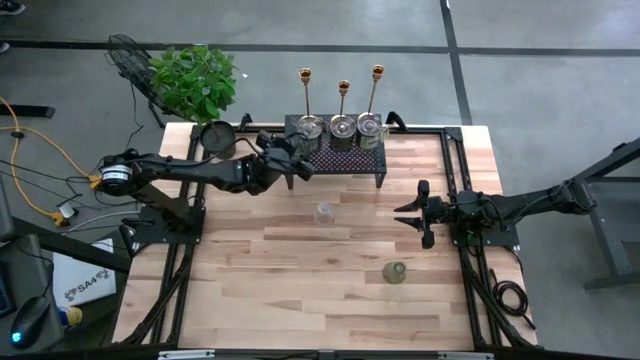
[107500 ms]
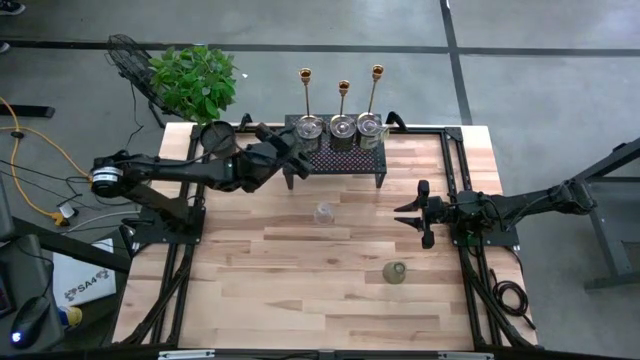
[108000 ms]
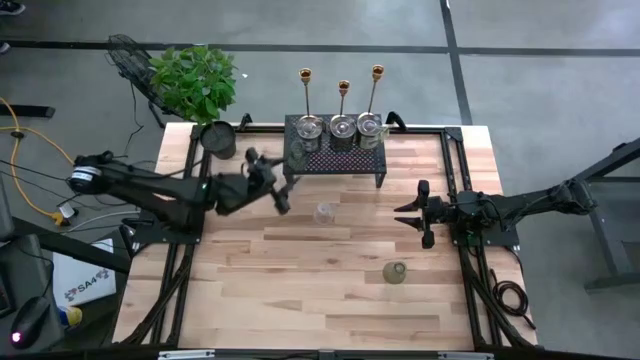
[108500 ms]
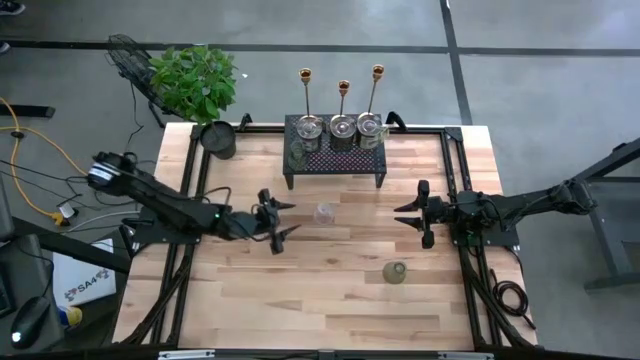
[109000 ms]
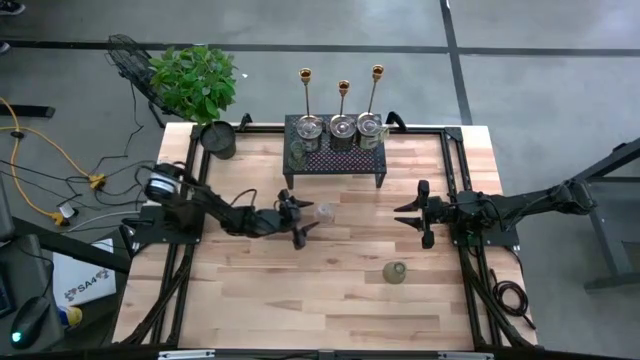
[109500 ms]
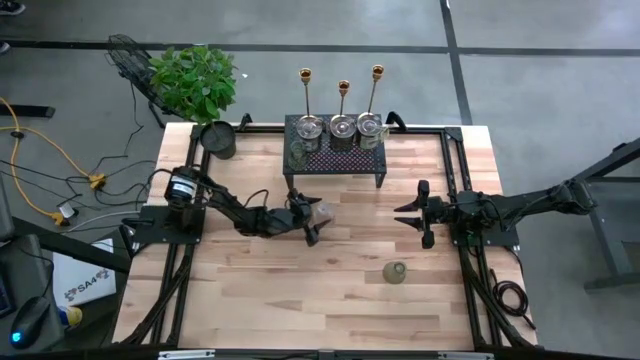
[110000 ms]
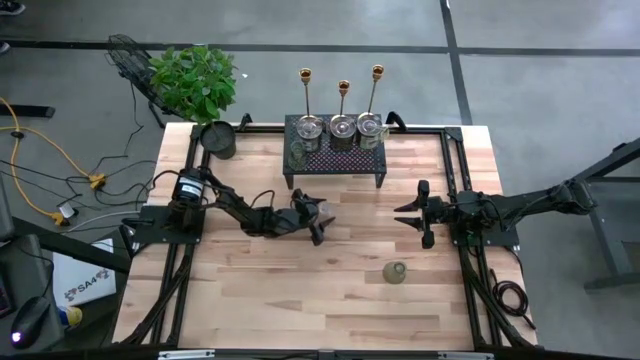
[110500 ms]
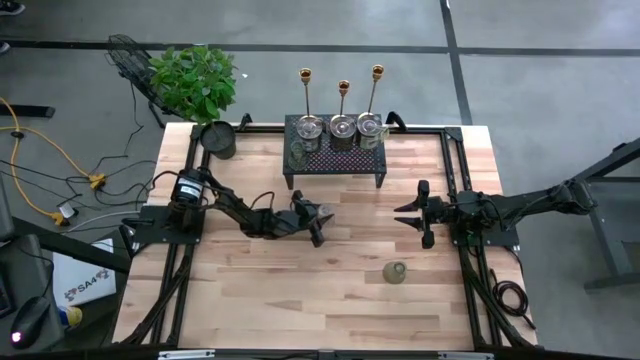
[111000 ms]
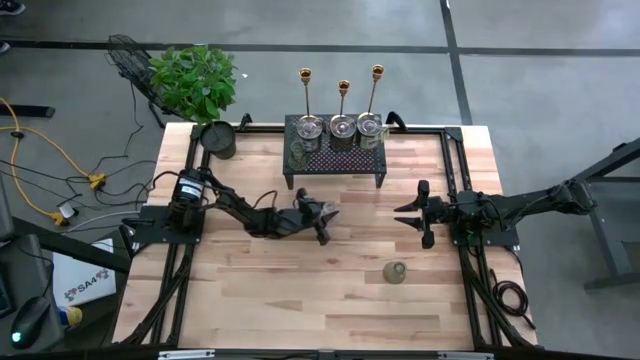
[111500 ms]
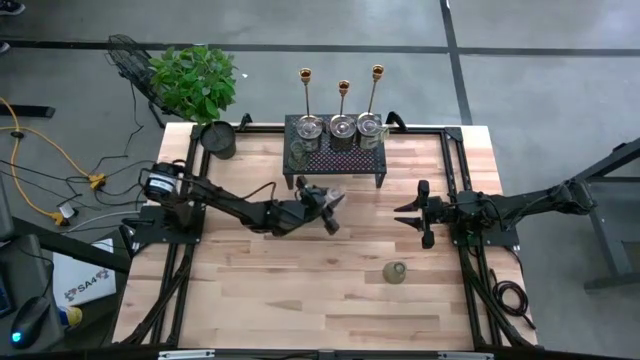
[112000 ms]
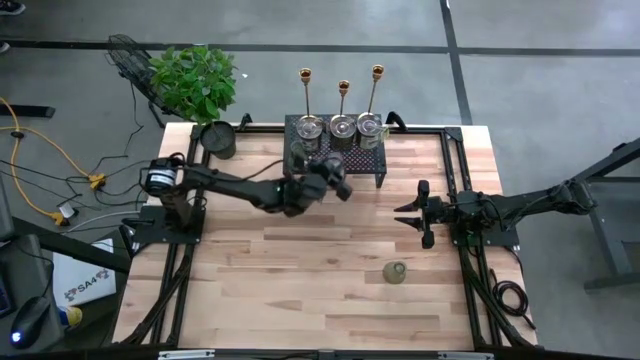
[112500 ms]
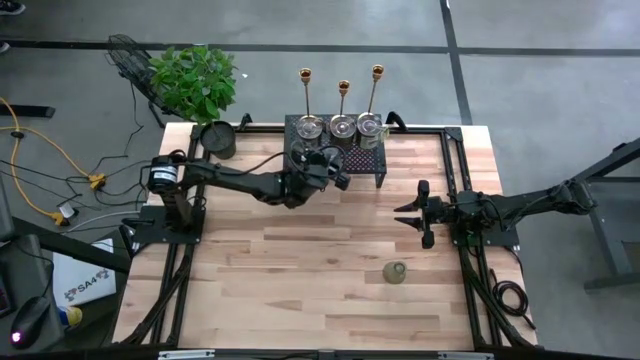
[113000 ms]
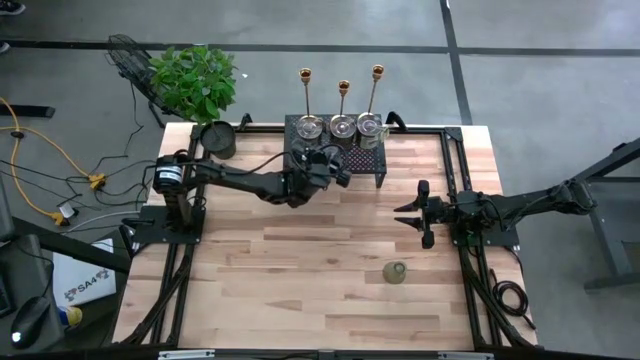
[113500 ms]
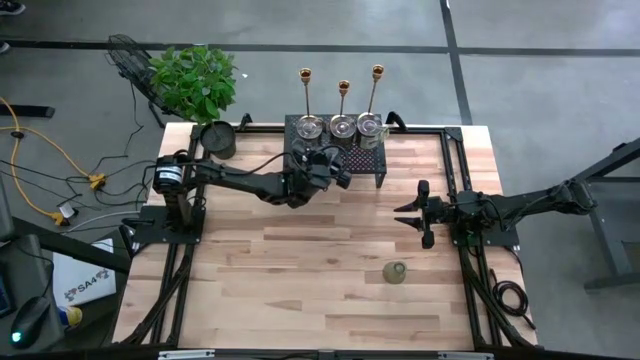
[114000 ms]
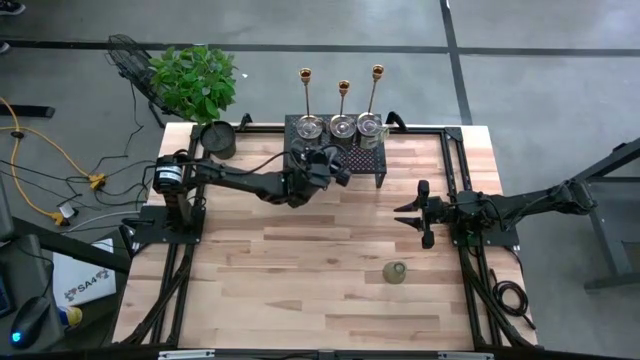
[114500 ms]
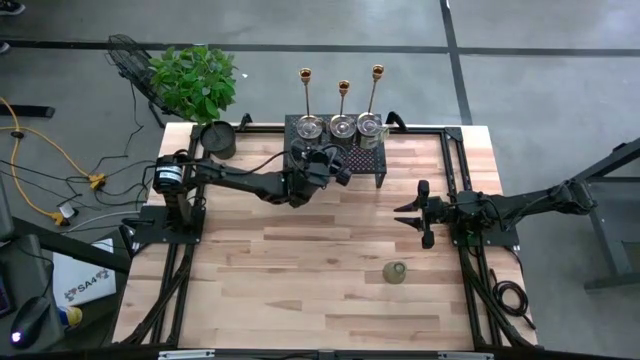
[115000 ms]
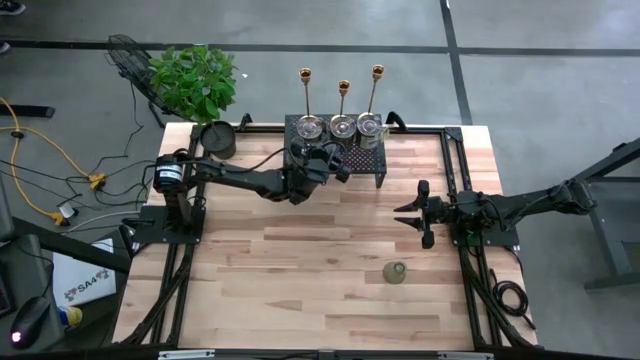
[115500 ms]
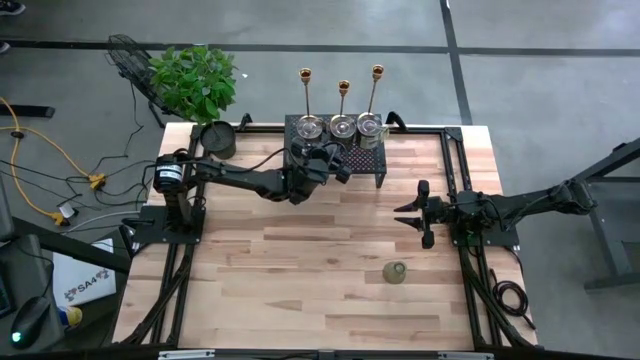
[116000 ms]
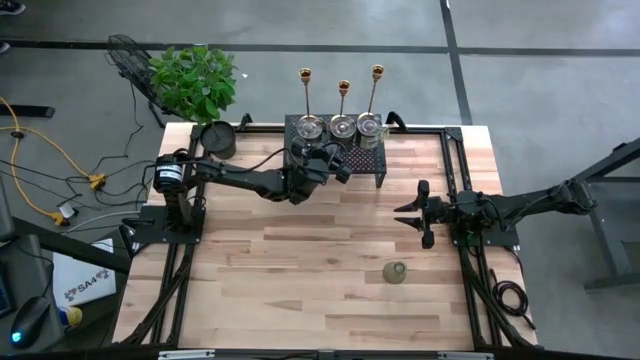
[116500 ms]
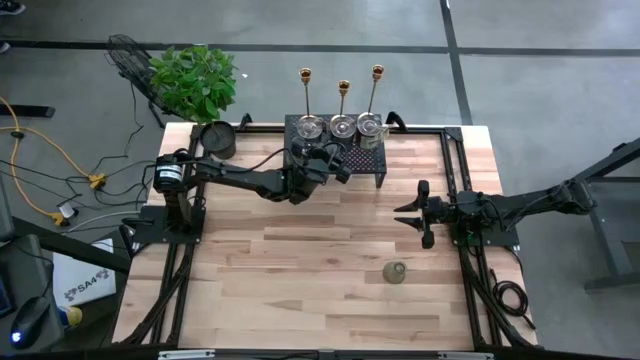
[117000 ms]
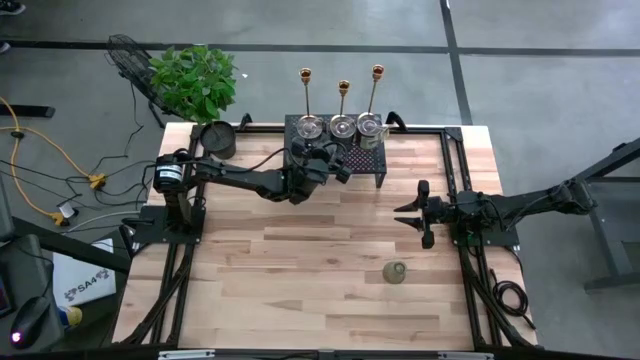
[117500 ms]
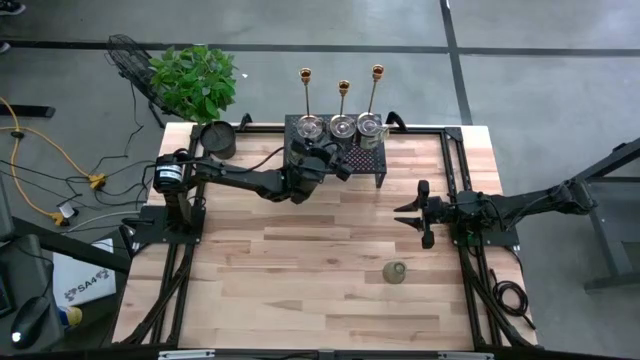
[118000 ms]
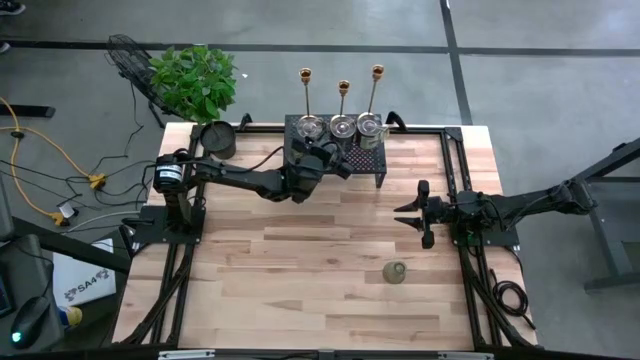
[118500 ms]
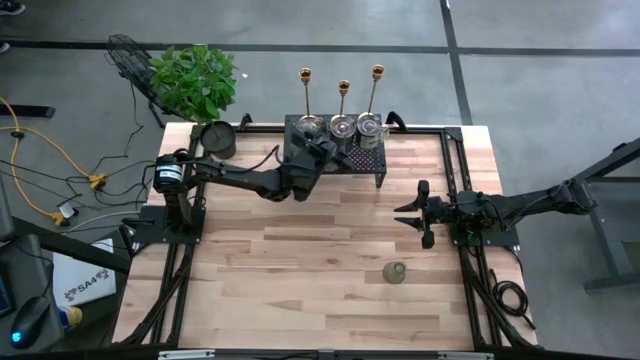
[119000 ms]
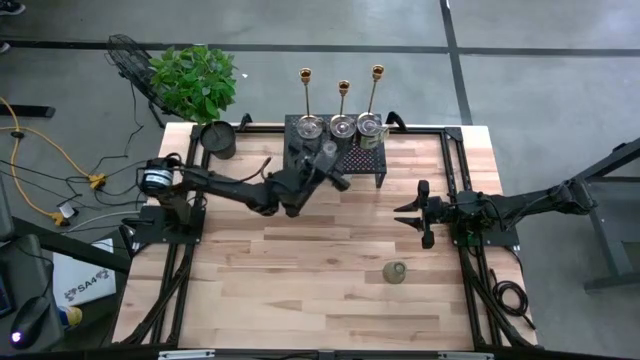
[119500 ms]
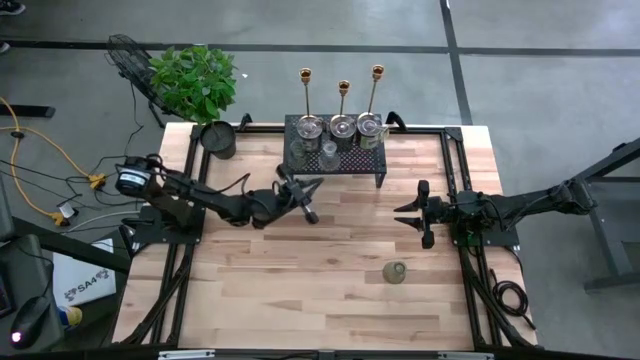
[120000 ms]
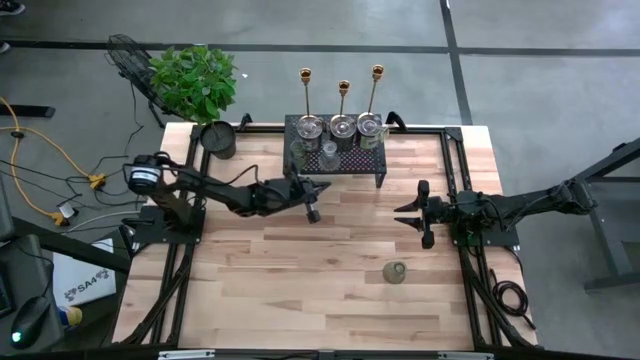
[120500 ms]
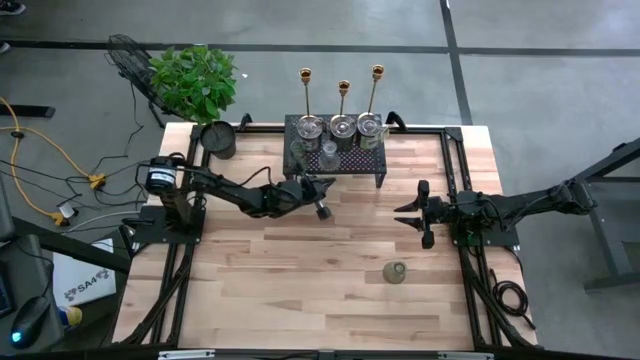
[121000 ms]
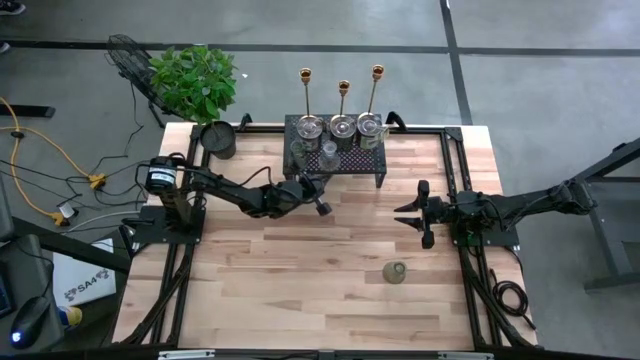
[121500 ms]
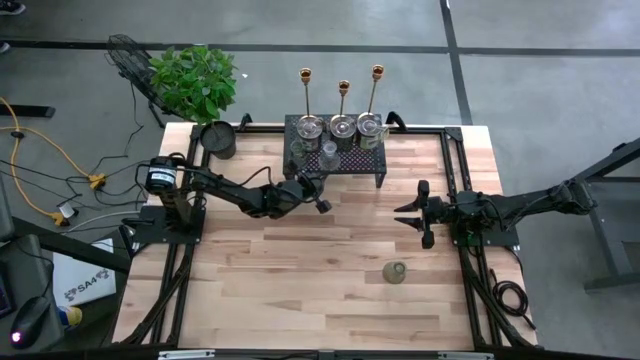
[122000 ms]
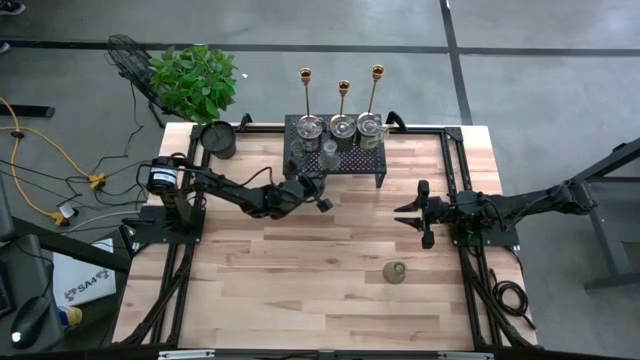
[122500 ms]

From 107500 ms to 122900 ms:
Task: Pick & Place candle stick holders
Put the transparent glass candle holder on the shelf

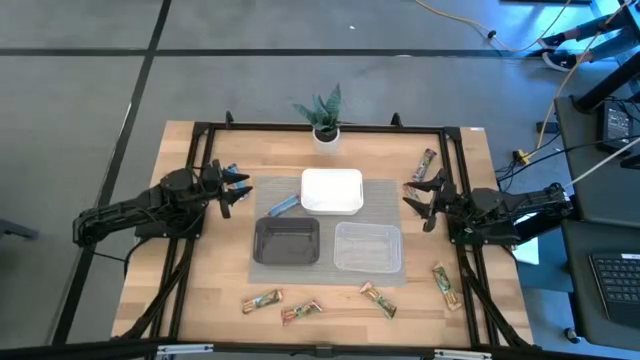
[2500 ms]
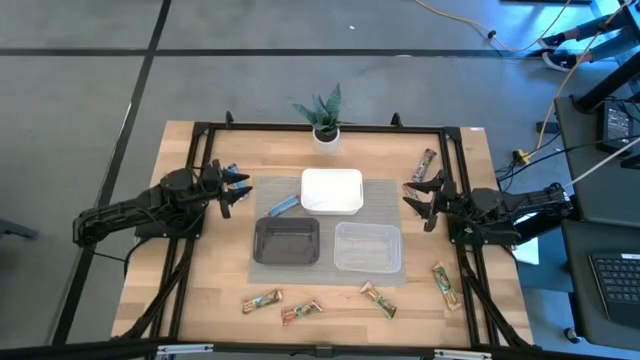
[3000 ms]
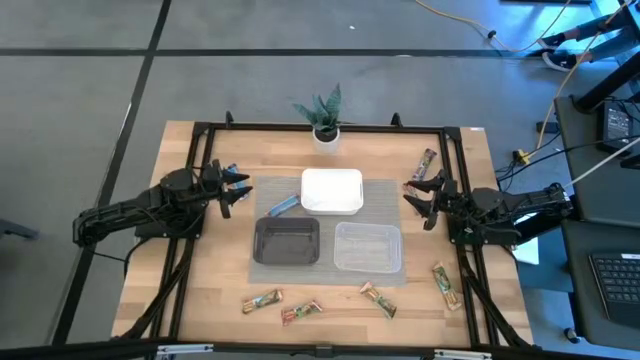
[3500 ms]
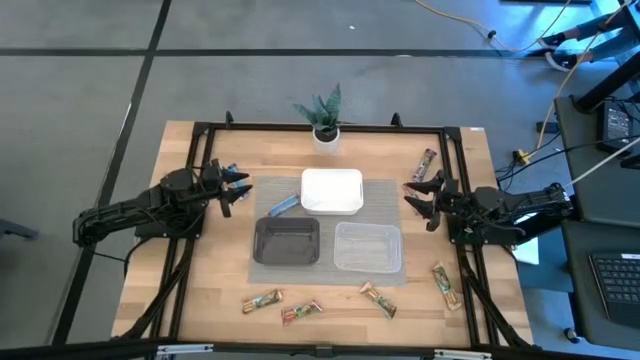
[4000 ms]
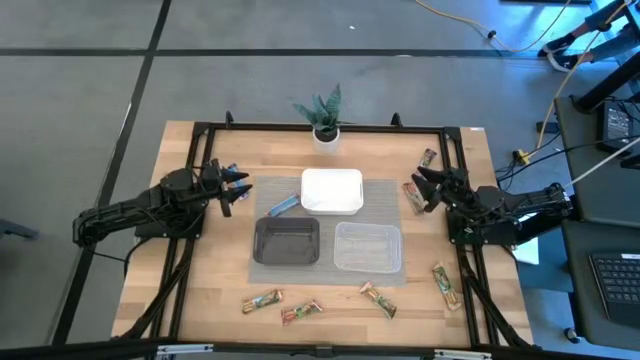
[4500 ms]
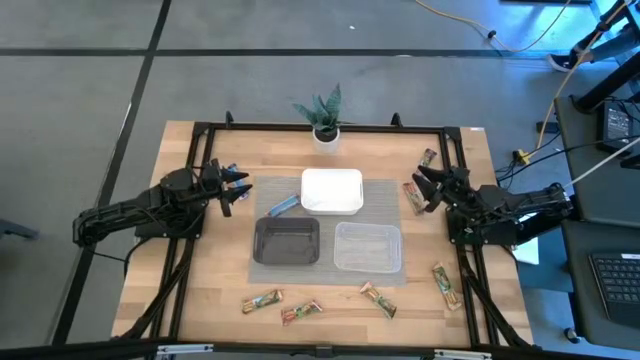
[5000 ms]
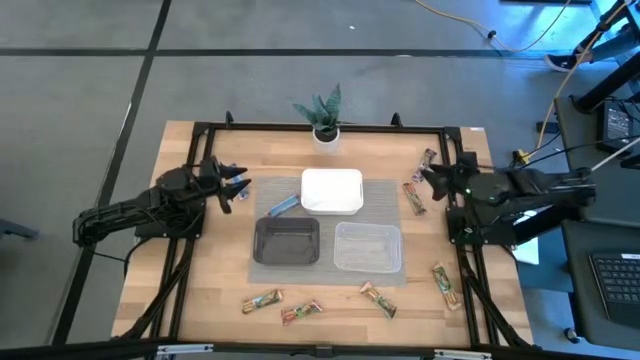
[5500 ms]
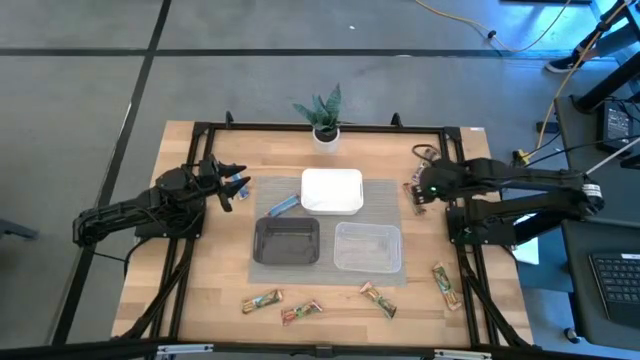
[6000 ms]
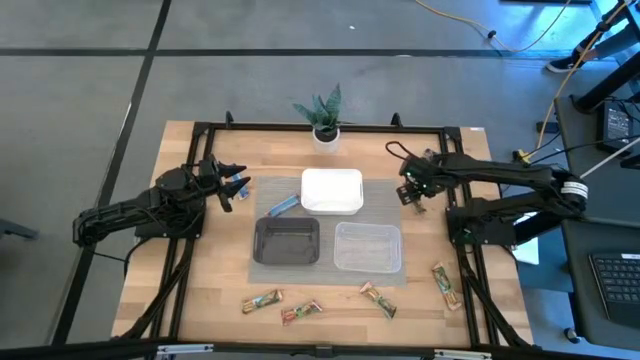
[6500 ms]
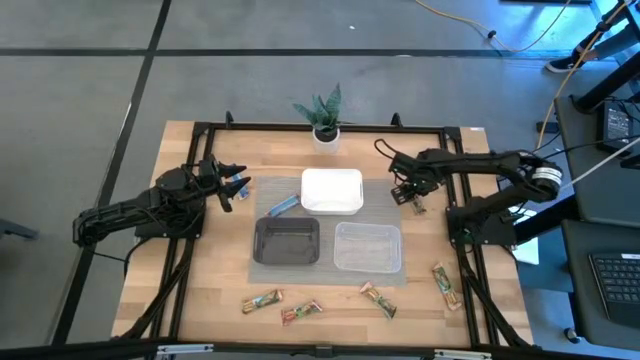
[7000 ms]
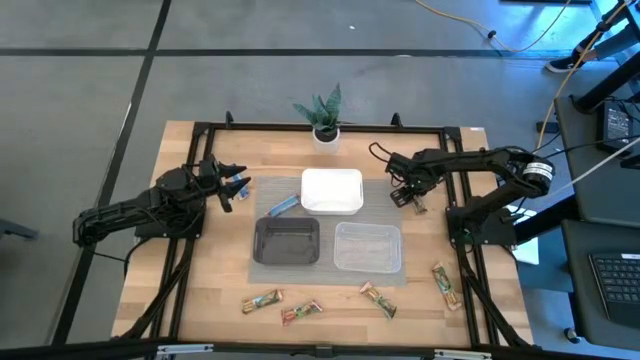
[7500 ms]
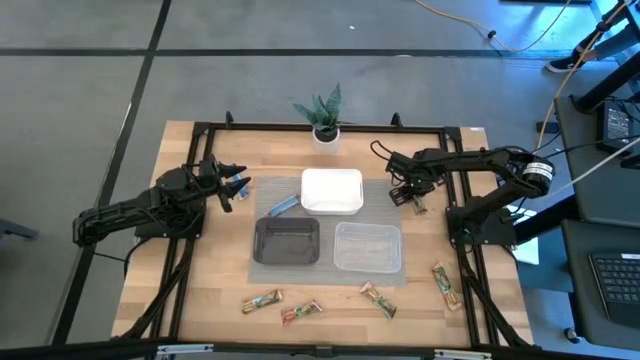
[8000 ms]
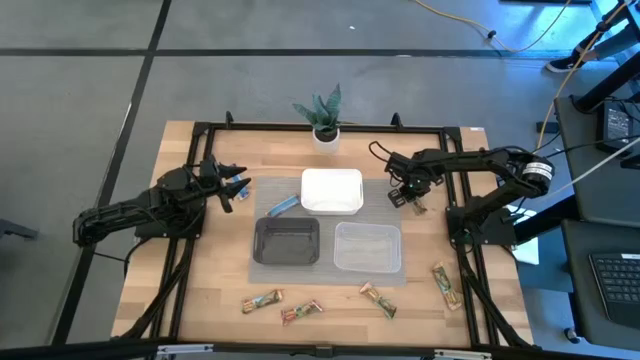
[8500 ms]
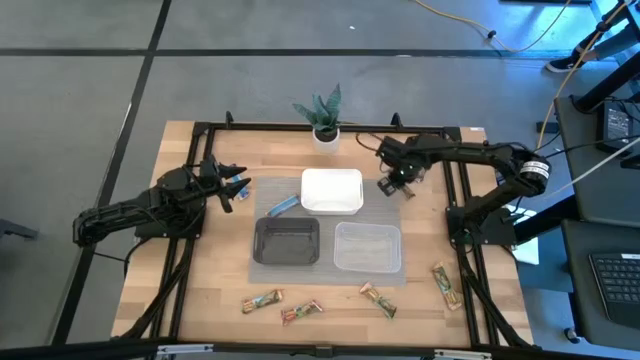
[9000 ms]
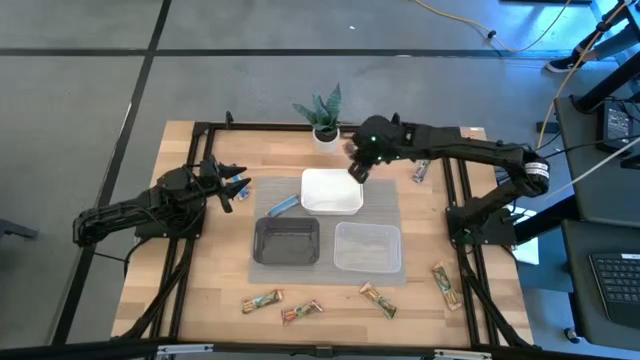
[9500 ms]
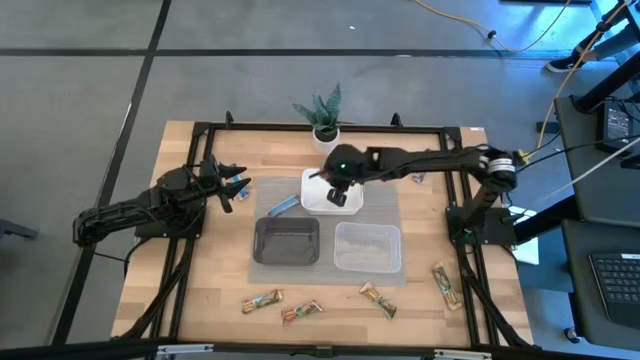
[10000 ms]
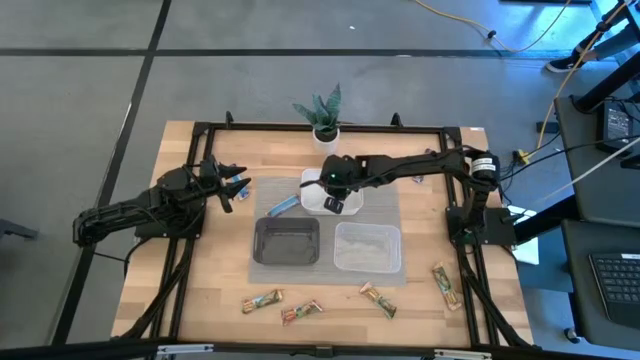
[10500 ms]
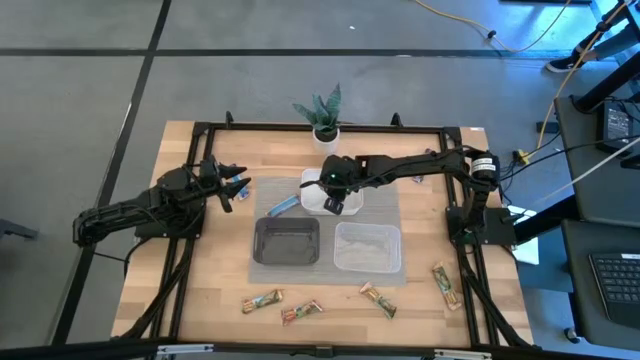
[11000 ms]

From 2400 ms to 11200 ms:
Task: Pick and place Granola Bars by type
Put the top right red granola bar into the white bin
